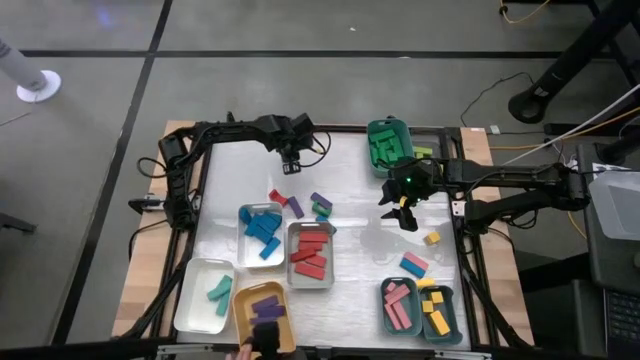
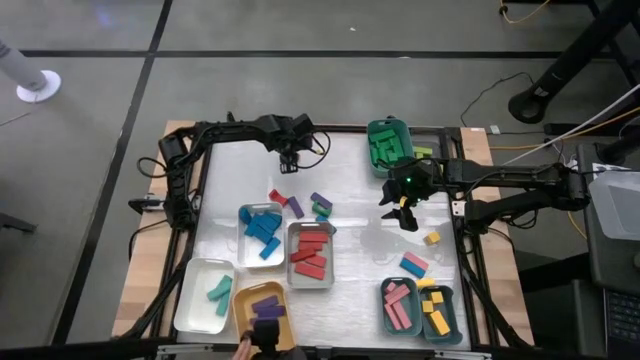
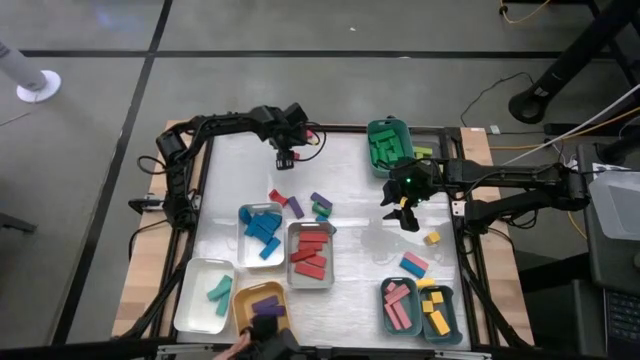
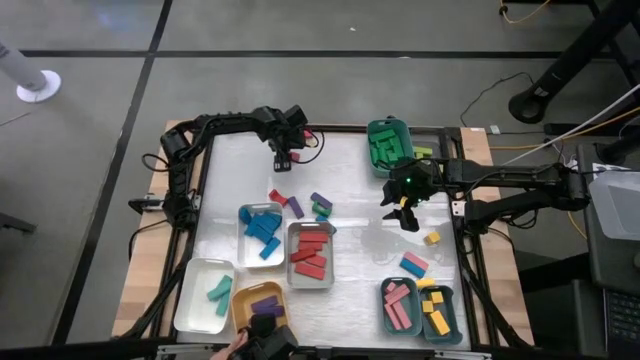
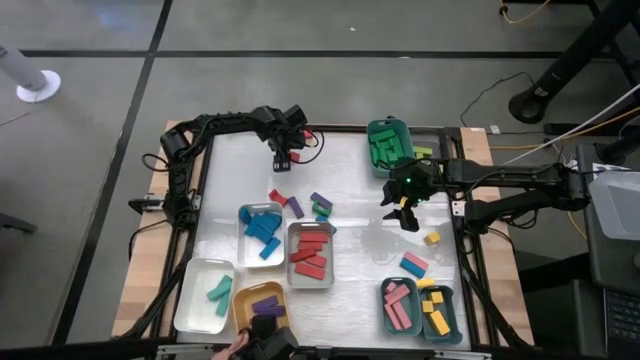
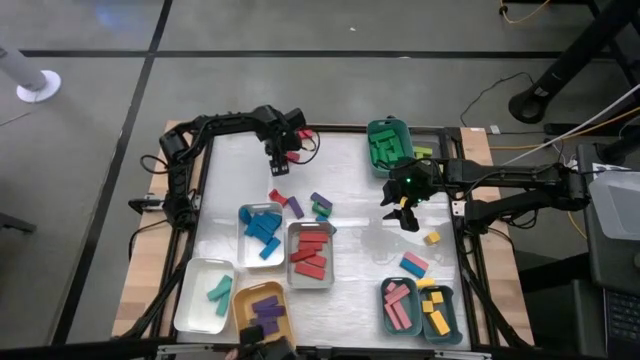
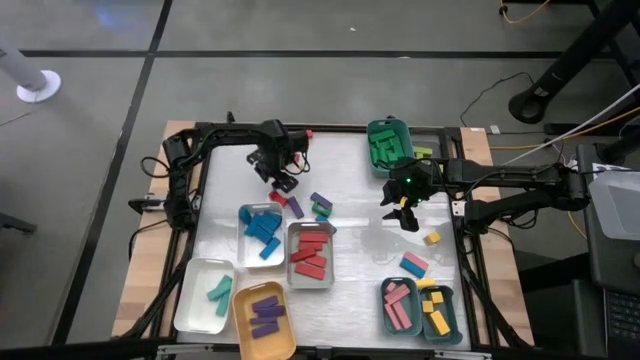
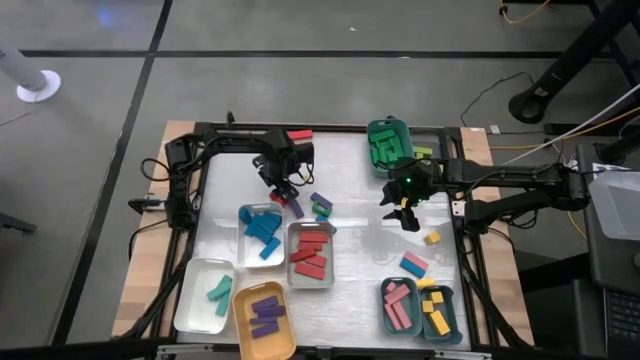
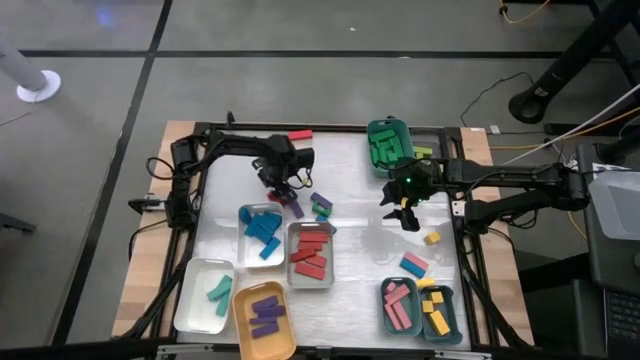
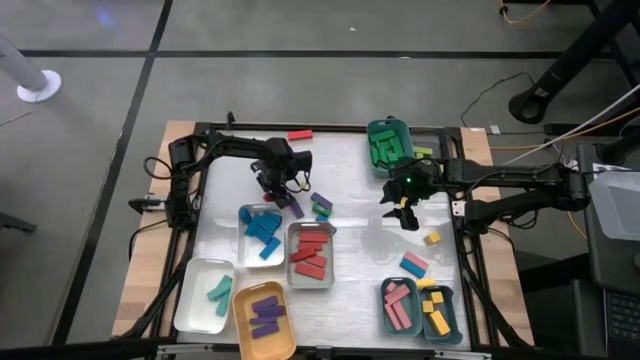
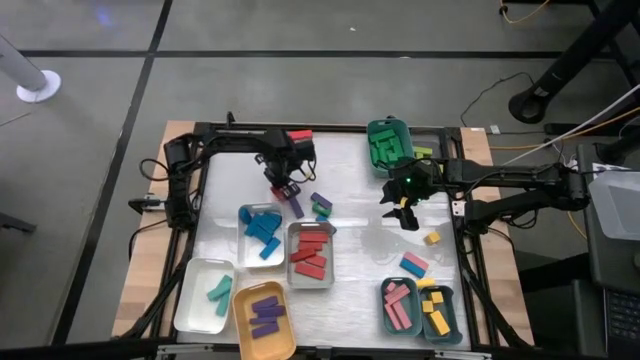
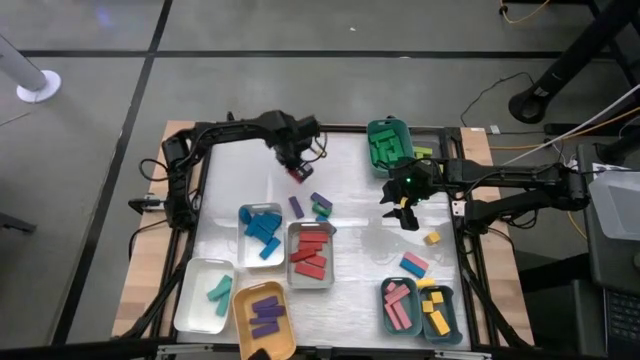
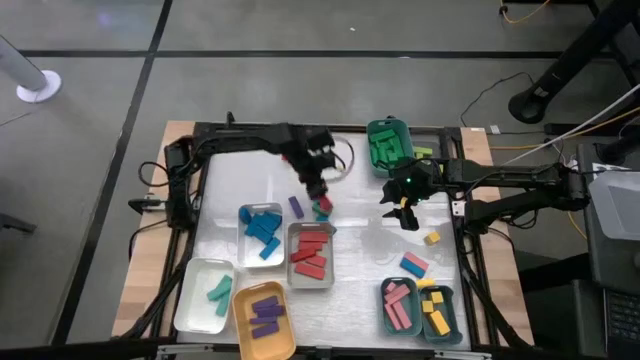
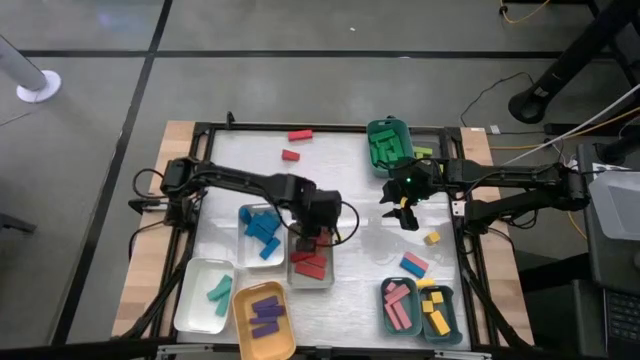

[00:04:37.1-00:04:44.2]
Task: Sort blocks
Put the red block into the gray bin

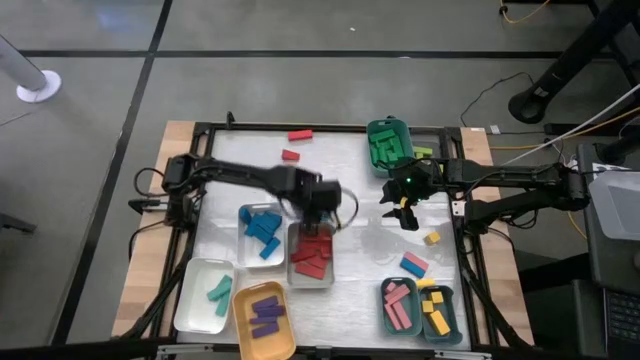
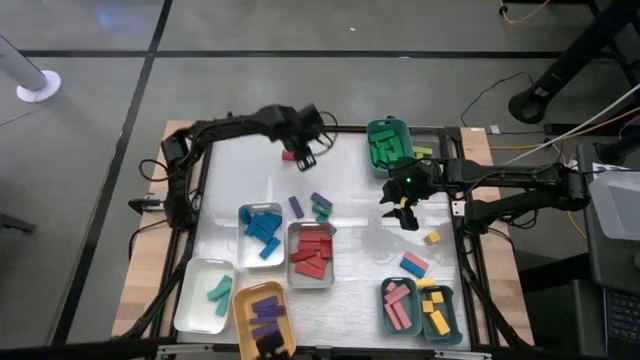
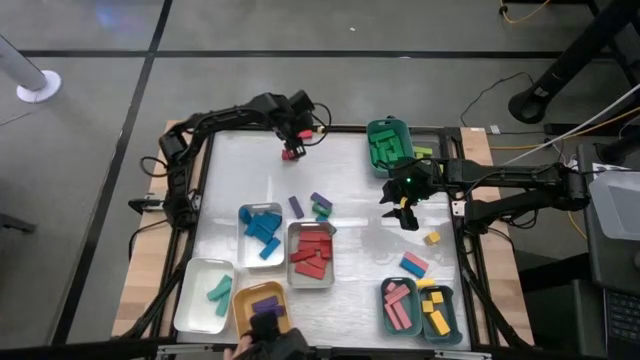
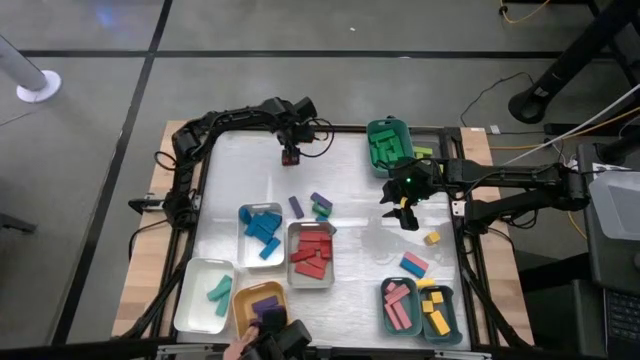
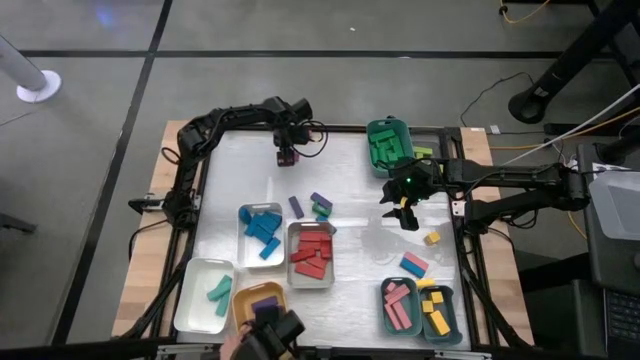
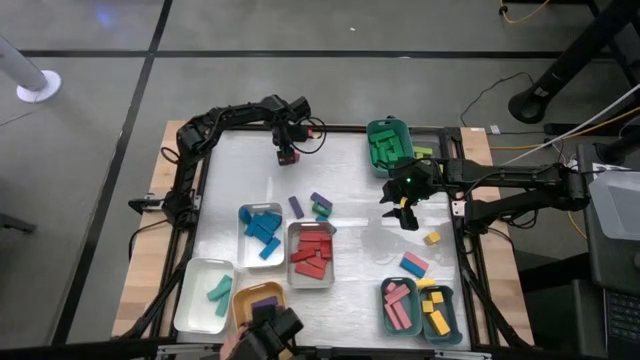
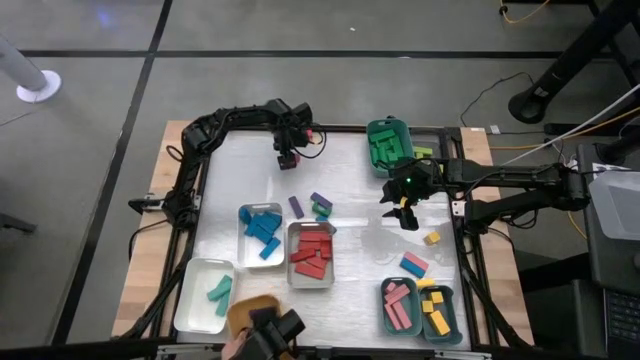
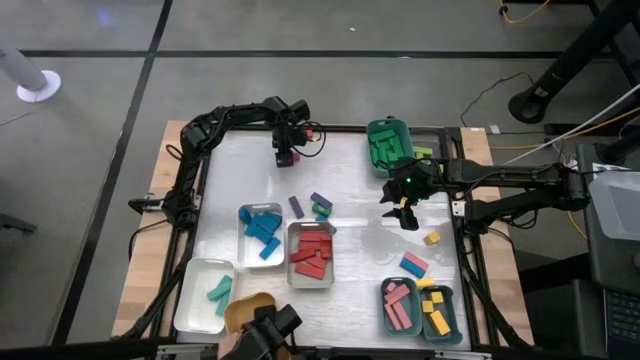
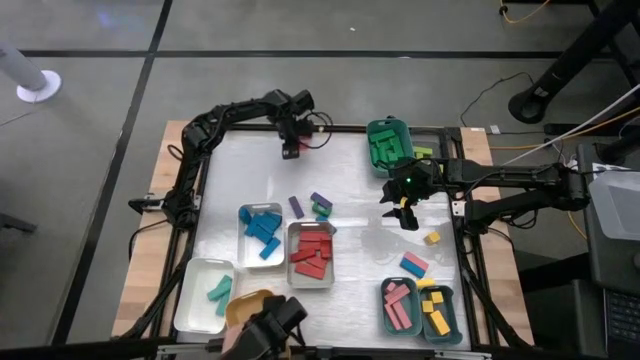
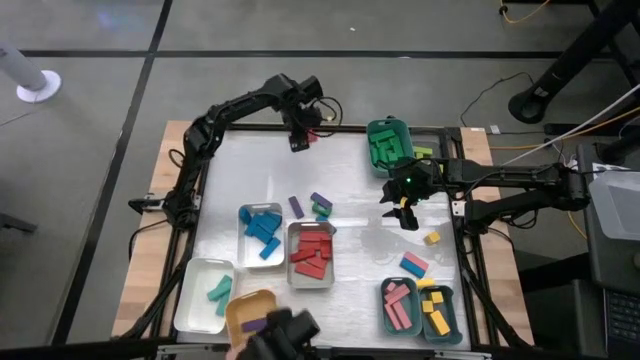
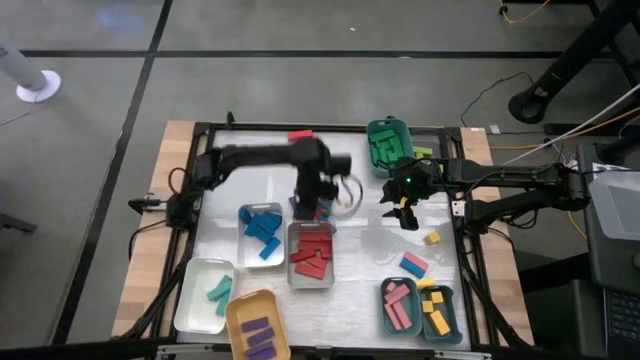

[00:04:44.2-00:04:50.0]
Put the red block into the gray bin

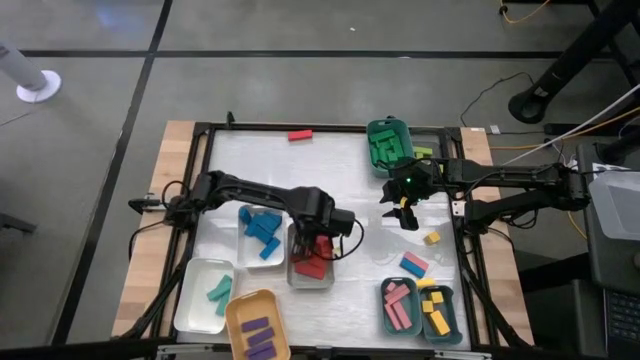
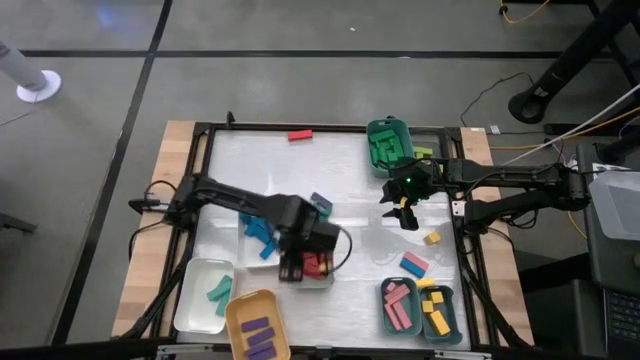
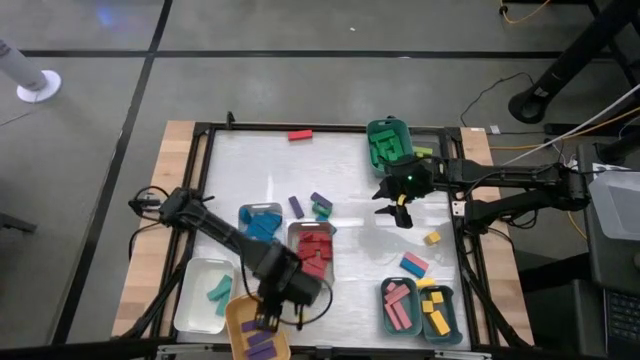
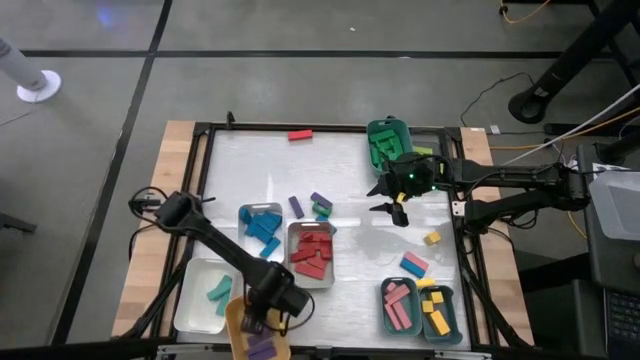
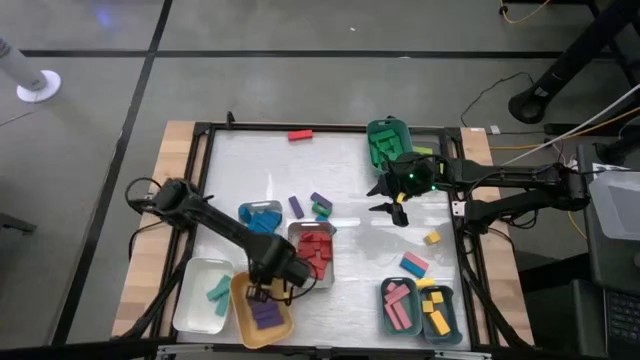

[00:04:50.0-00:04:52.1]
Adjust the yellow bin on the table

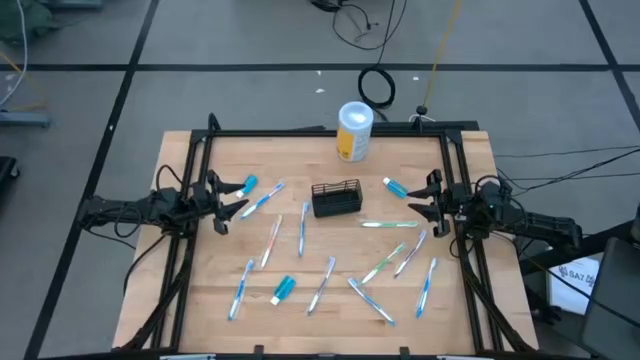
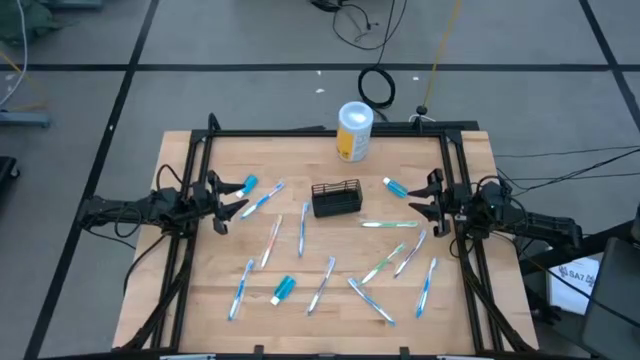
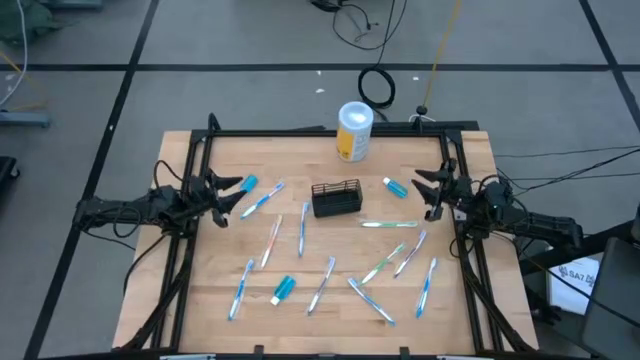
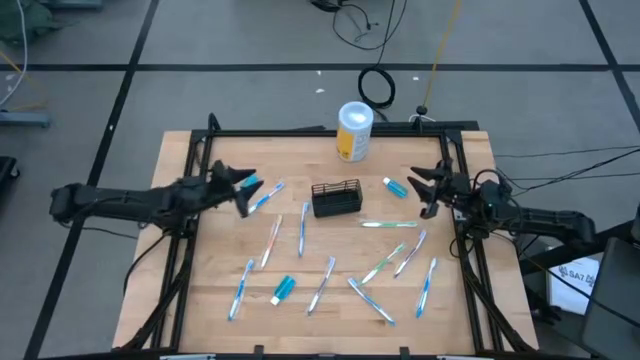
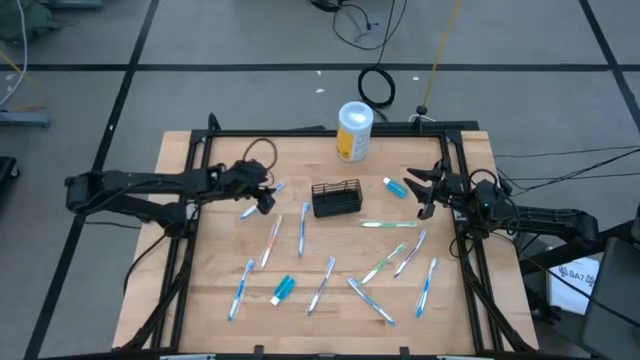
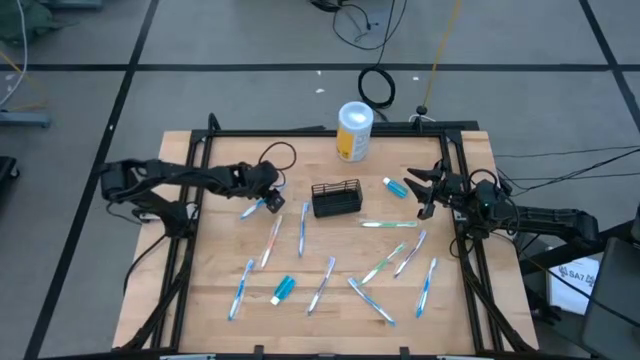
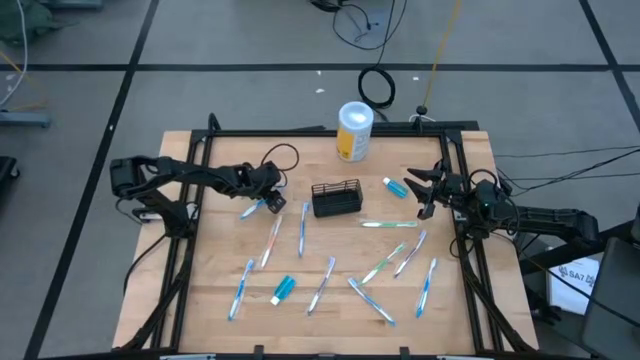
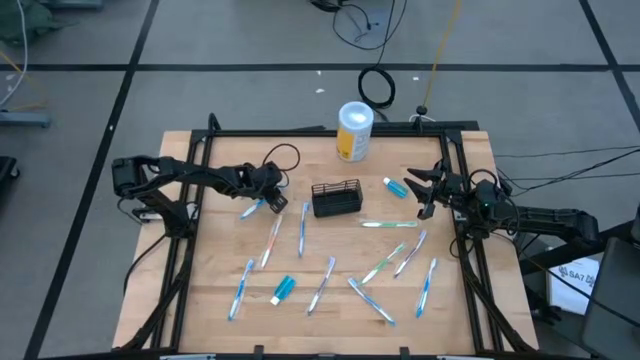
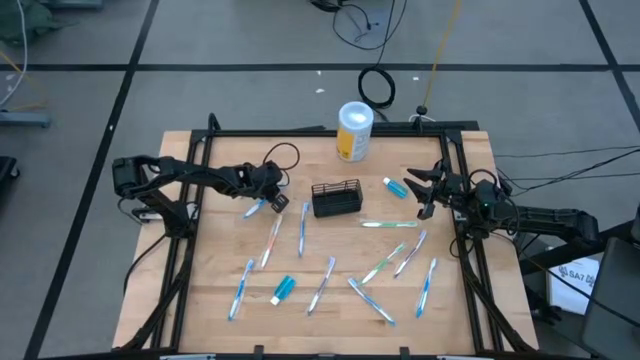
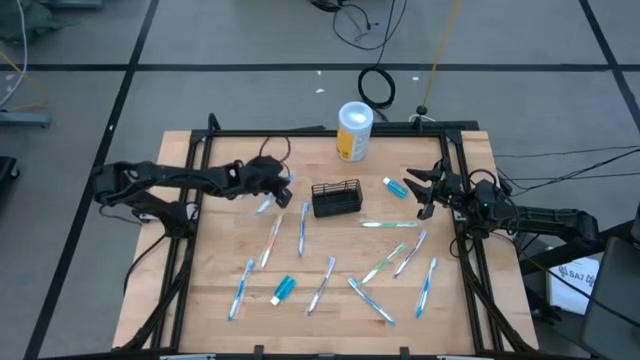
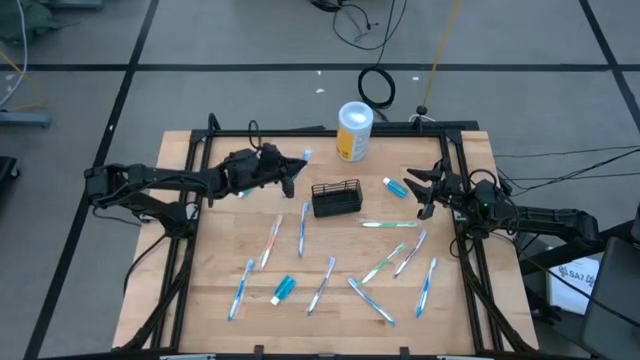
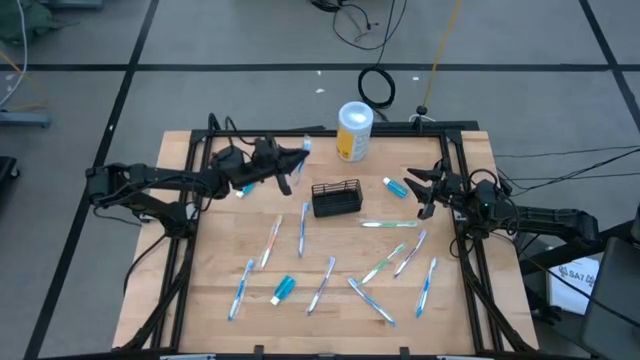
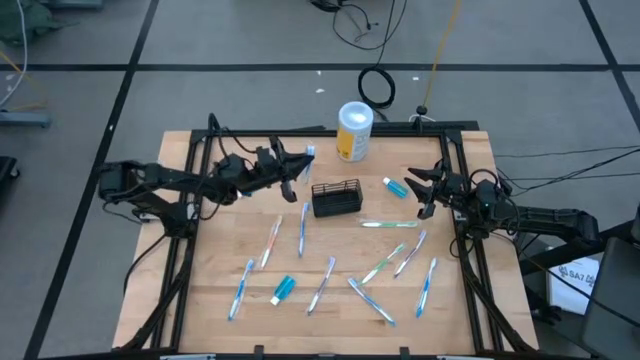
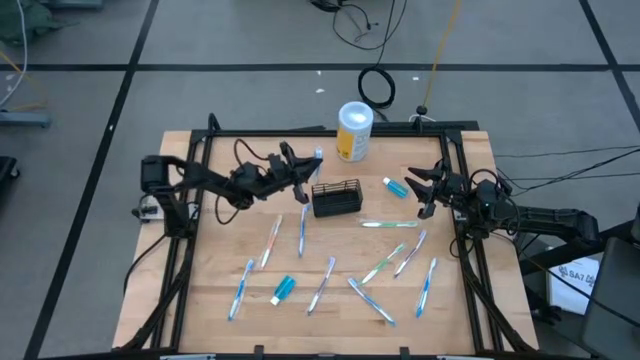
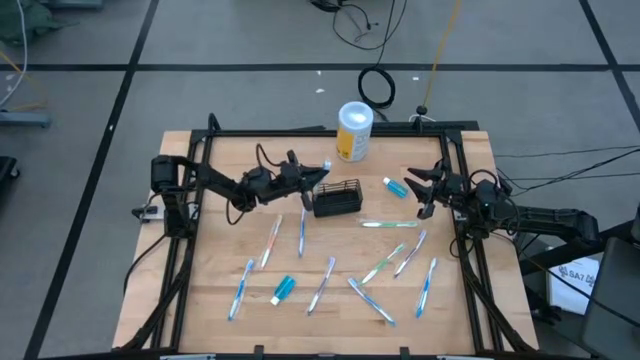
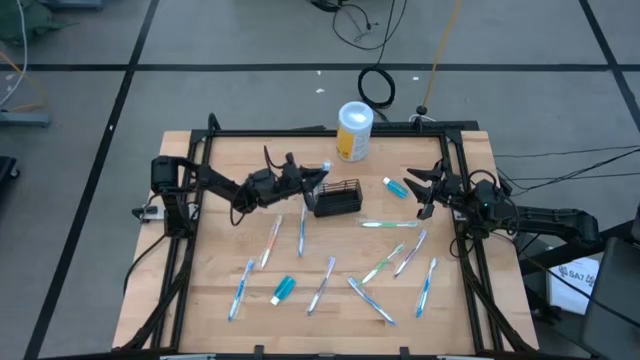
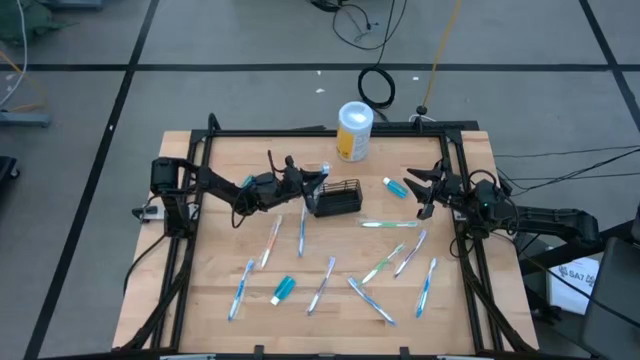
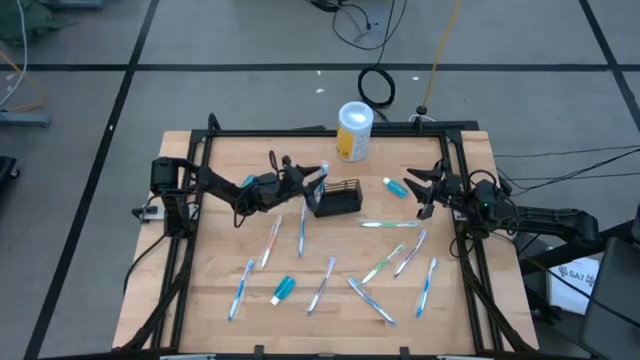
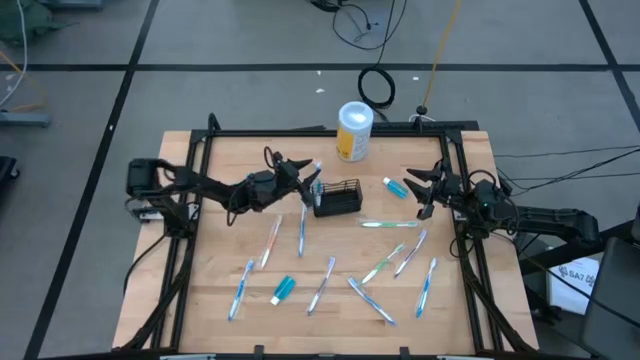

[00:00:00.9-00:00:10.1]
Task: Pick & Place toothbrushing station
Put the blue toothbrush into the black wire organizer
